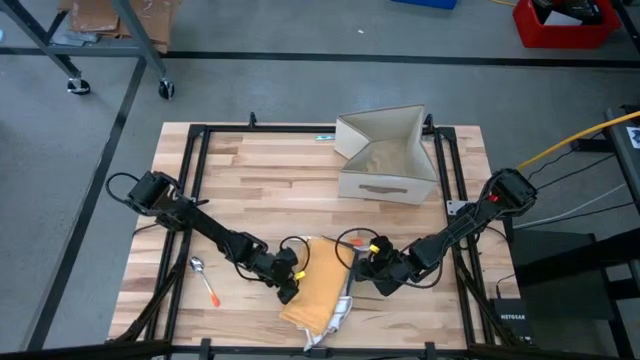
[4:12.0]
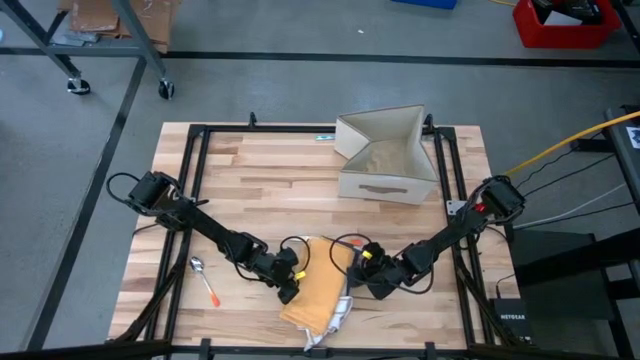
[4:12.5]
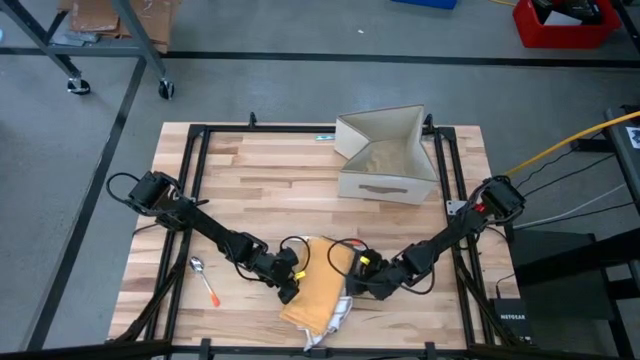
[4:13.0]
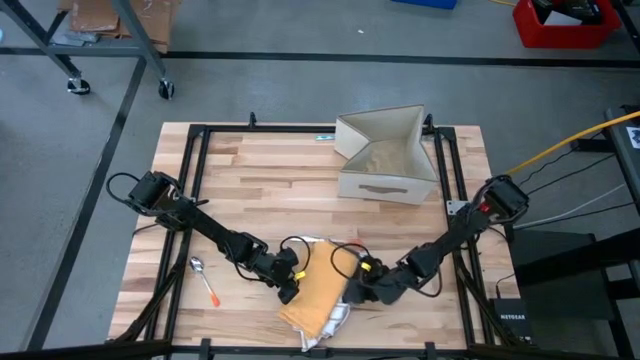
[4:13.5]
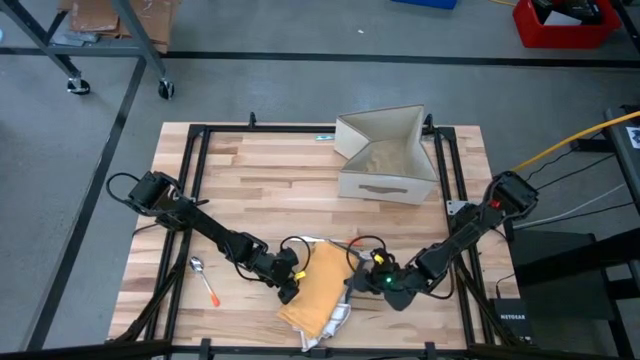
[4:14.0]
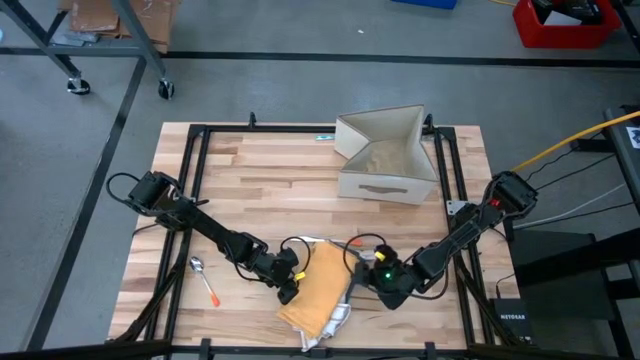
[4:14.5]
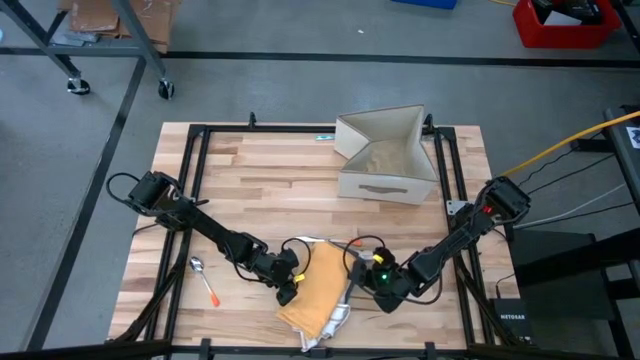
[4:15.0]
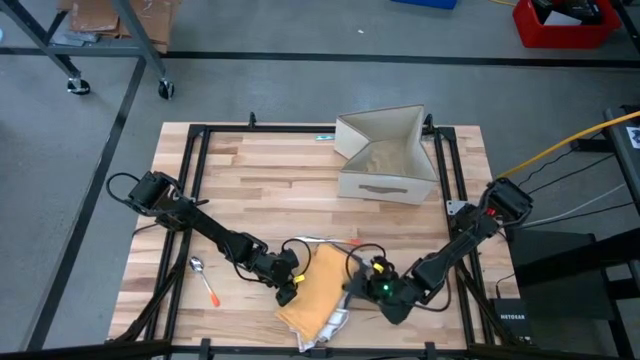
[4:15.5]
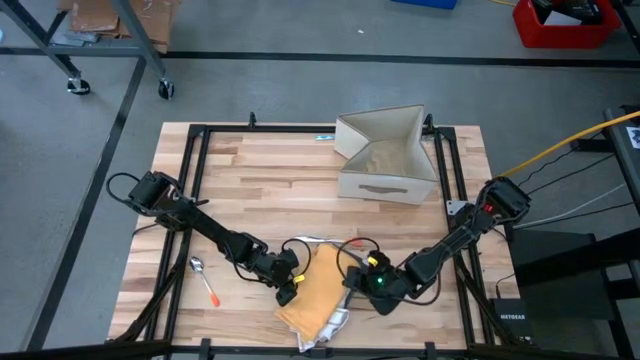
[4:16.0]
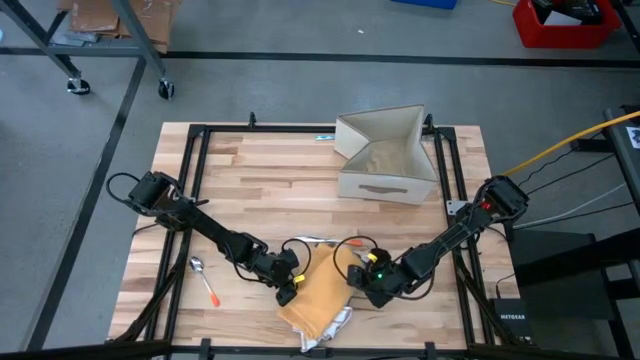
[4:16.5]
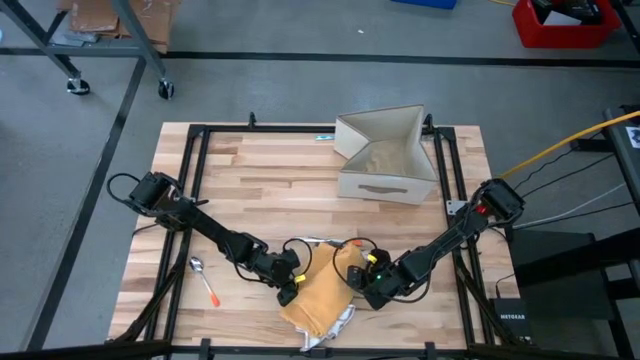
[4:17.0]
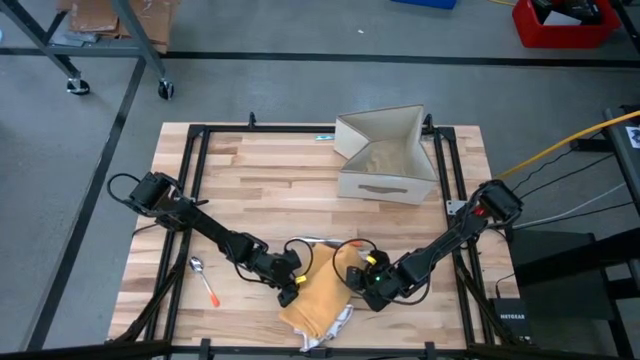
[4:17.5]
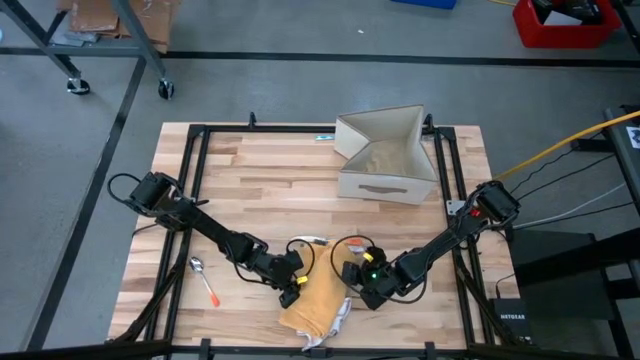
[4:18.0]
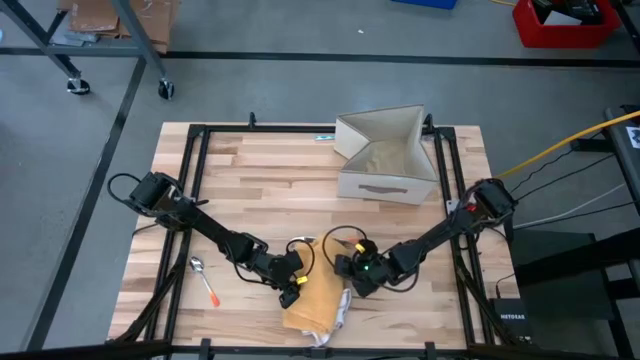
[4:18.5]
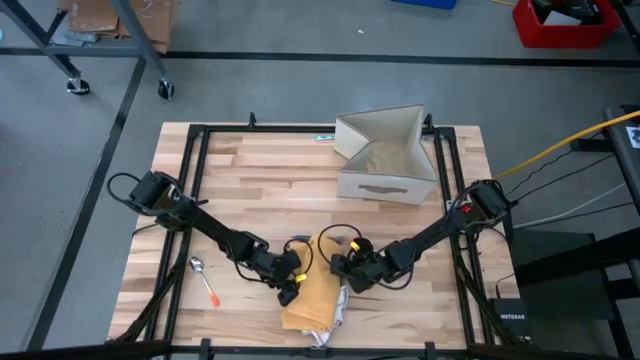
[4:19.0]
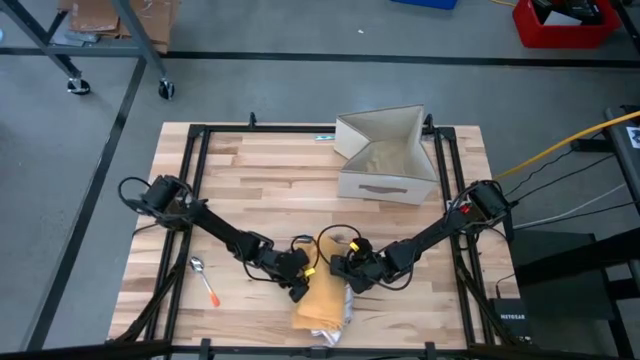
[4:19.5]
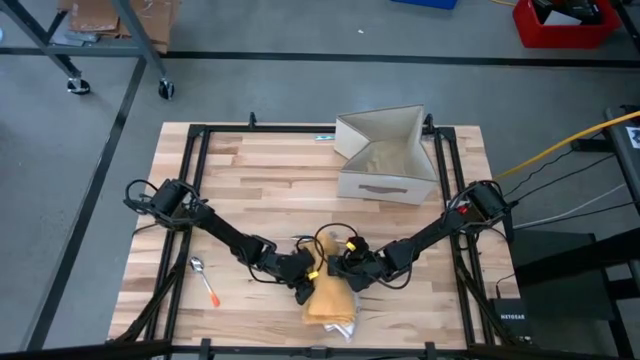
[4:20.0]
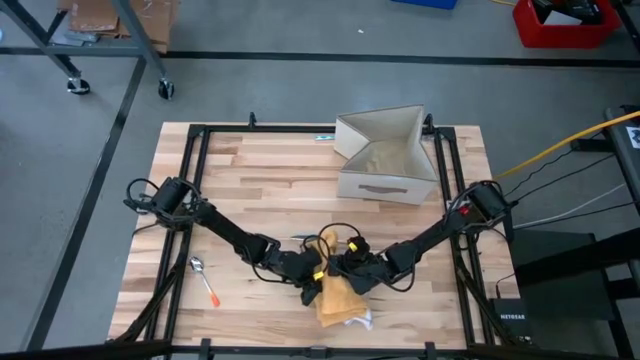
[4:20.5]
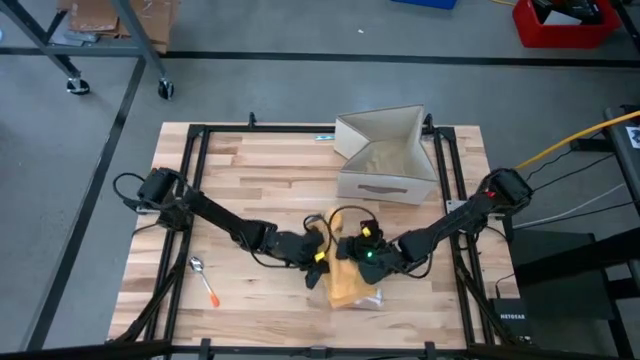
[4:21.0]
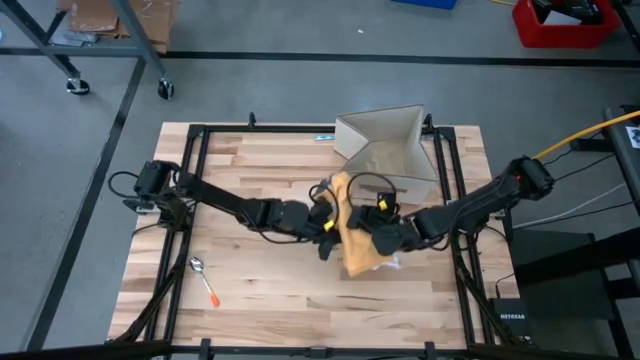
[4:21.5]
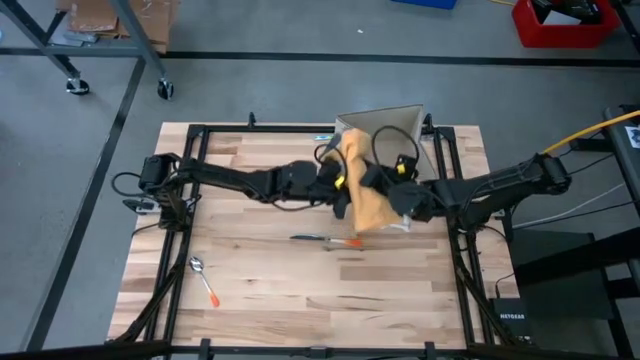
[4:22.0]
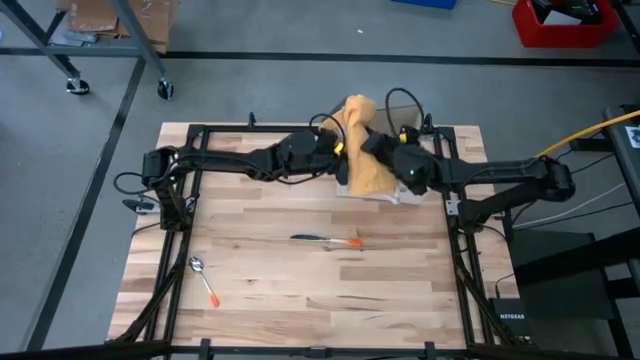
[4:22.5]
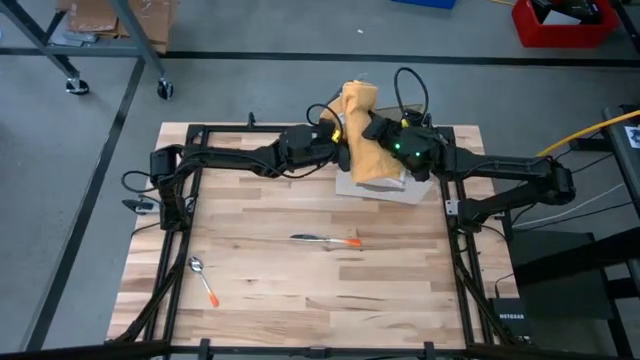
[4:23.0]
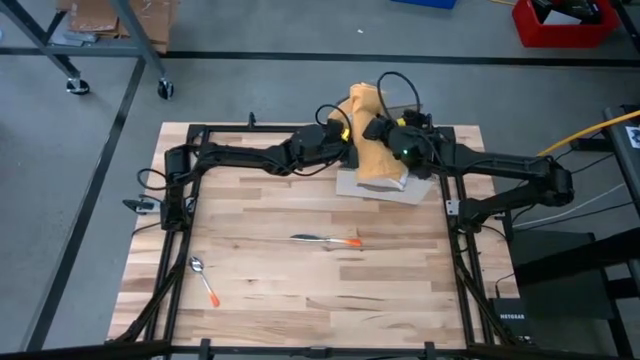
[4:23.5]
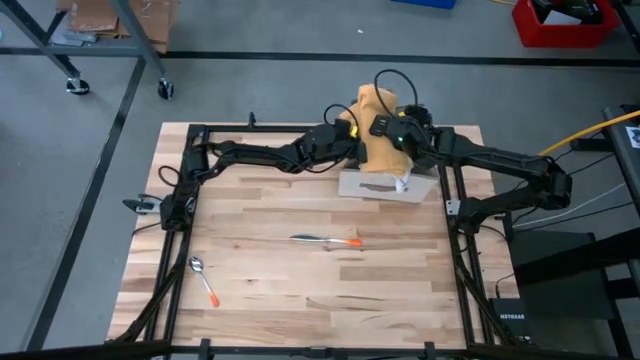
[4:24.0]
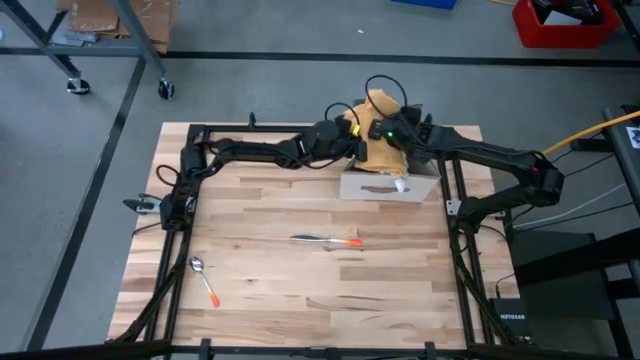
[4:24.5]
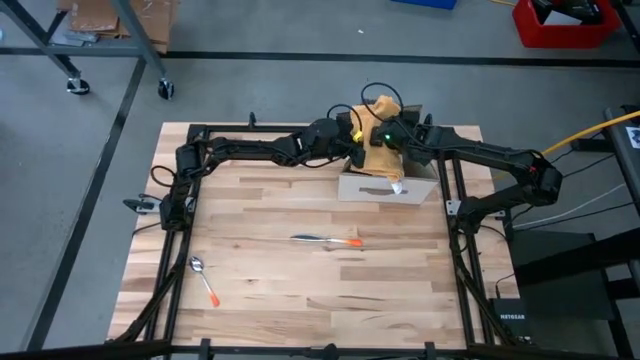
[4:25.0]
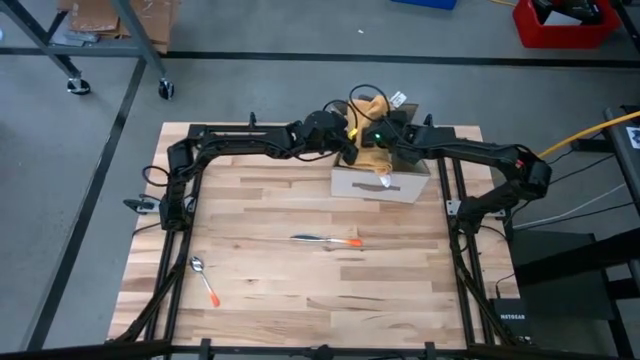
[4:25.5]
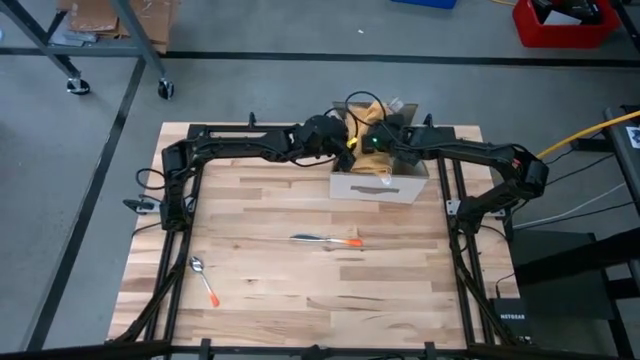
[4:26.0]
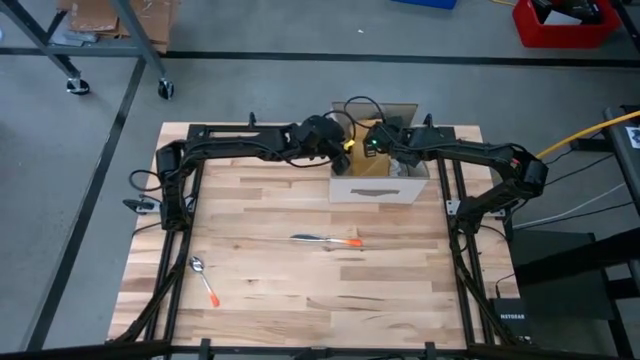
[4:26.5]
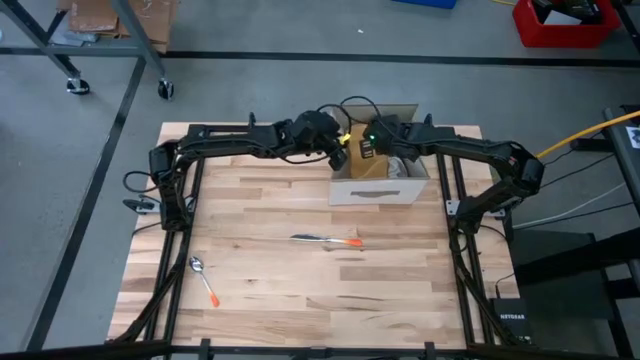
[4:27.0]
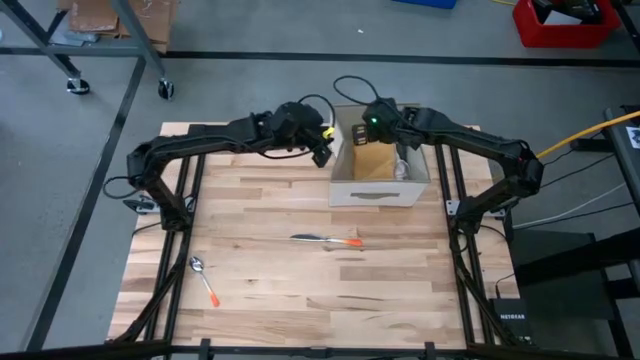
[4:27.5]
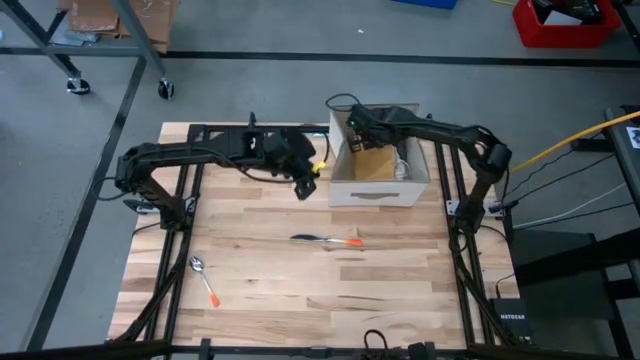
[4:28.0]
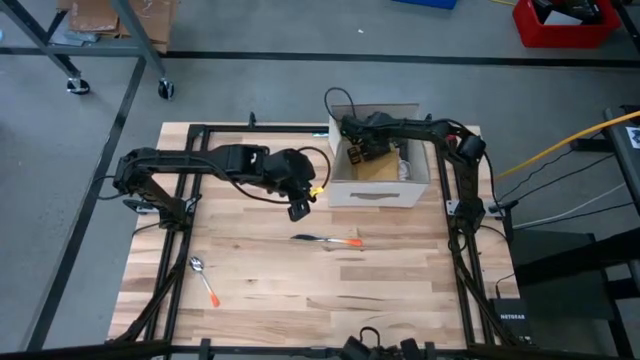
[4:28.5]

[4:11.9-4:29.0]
Task: Fold towel
Put the kitchen towels into the brown laundry organizer

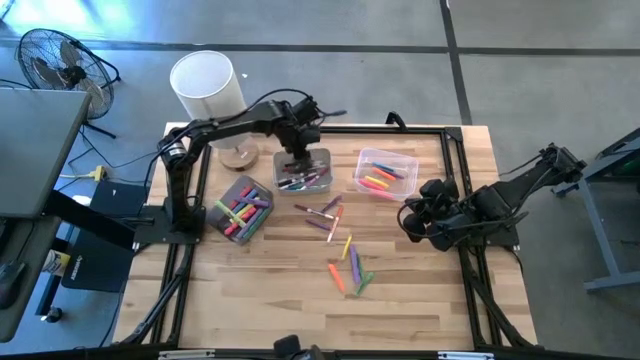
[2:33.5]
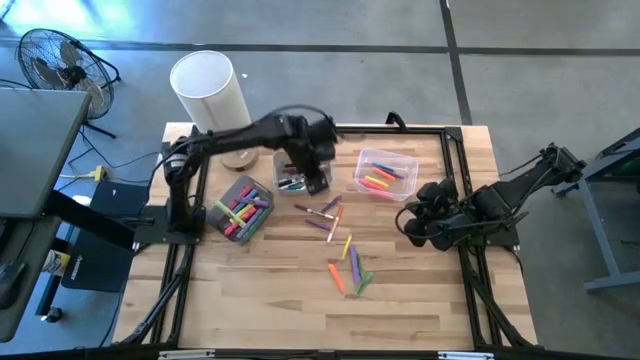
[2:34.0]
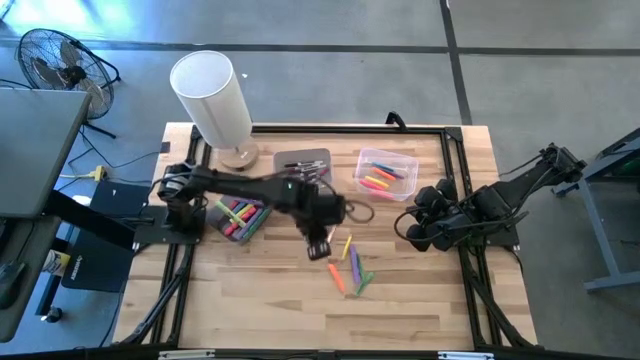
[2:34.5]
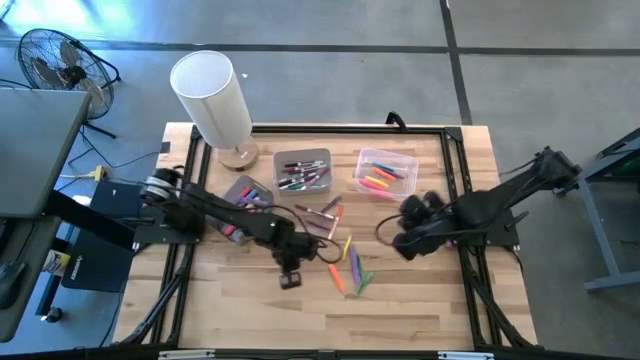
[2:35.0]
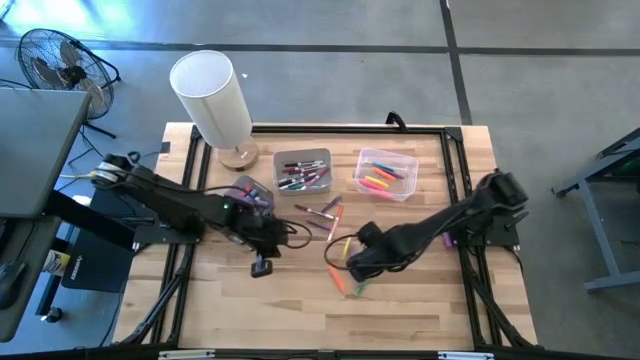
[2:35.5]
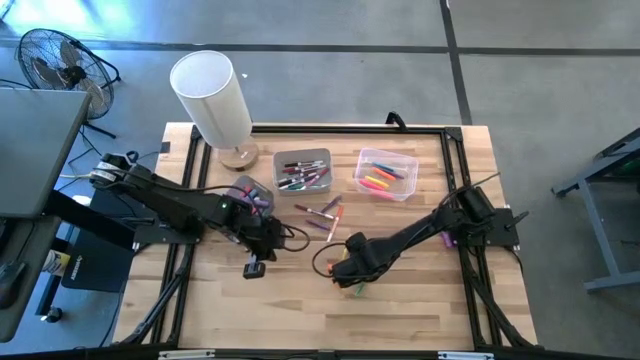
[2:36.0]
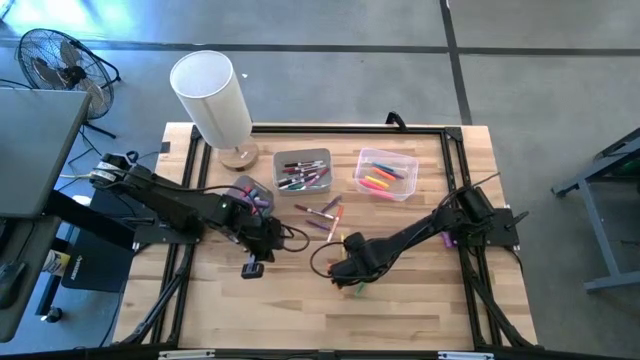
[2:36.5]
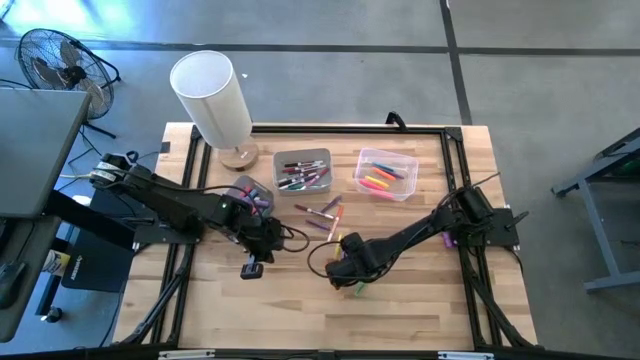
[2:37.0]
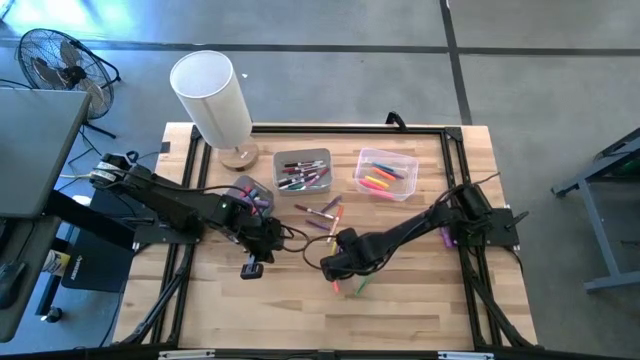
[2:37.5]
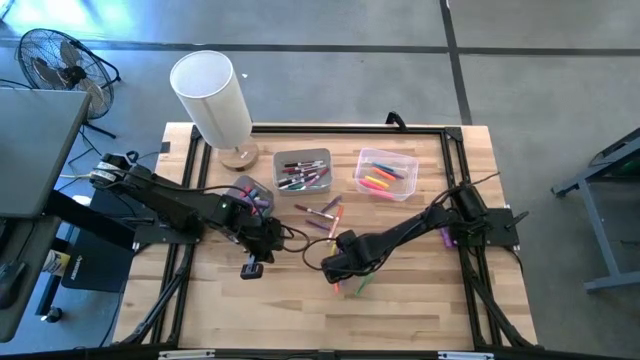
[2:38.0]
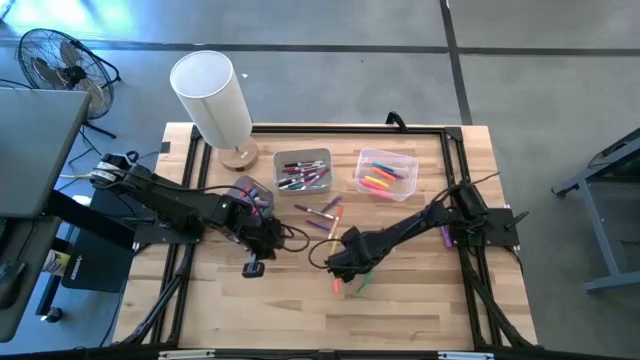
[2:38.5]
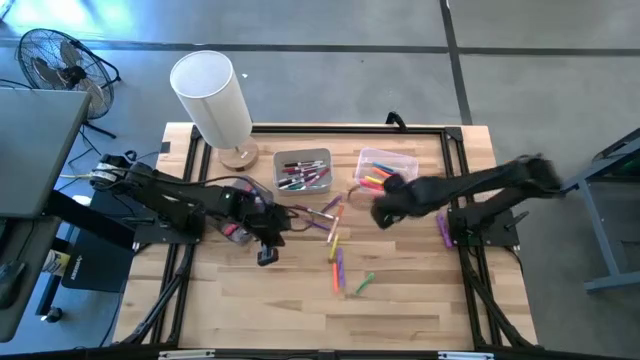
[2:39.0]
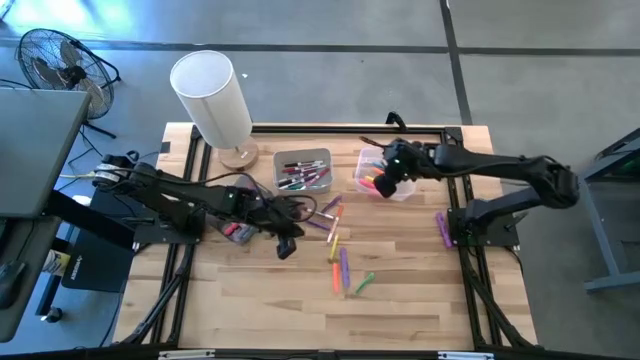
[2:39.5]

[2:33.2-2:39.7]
Task: Pick & Place Markers
Put the green pen into the transparent bin
